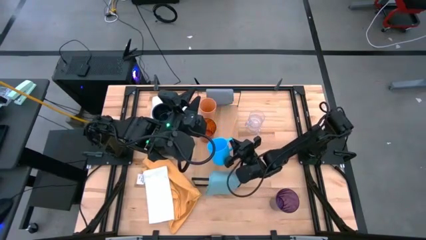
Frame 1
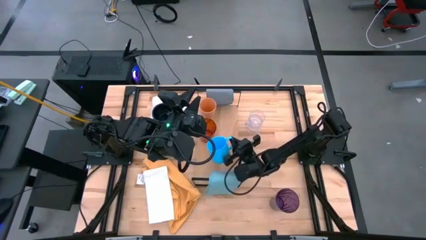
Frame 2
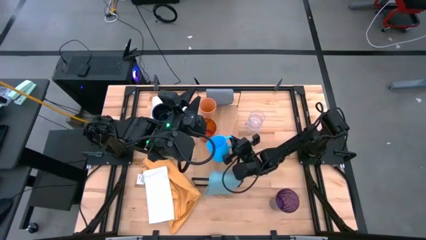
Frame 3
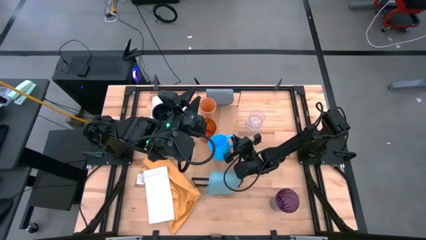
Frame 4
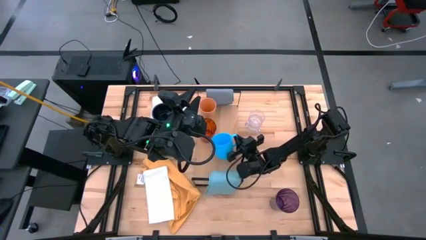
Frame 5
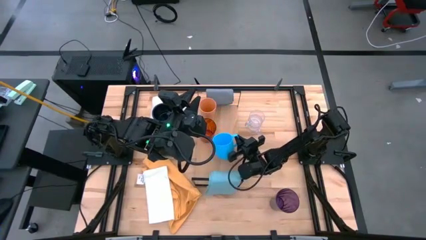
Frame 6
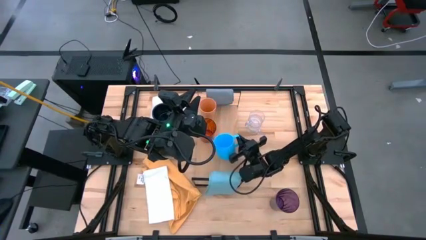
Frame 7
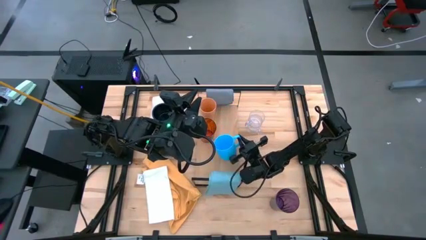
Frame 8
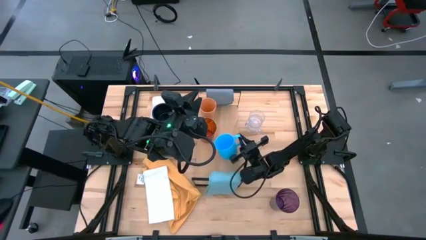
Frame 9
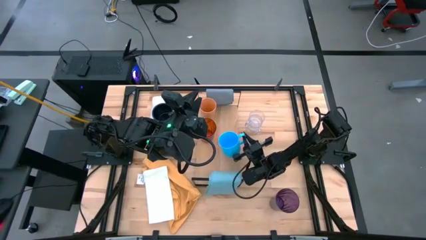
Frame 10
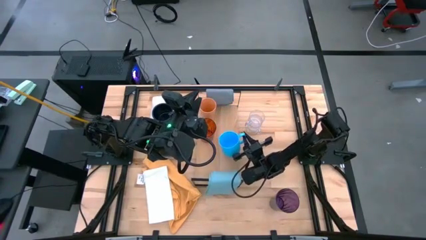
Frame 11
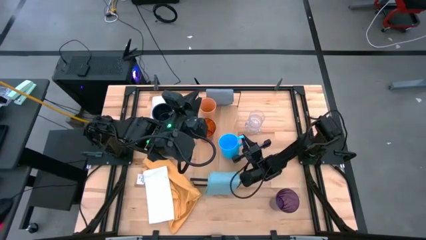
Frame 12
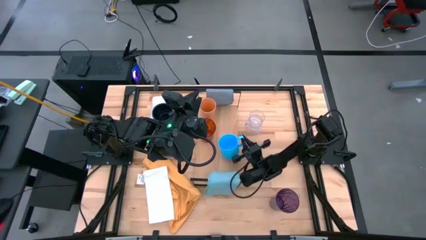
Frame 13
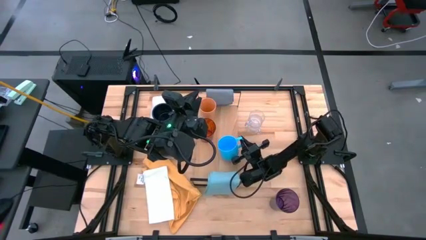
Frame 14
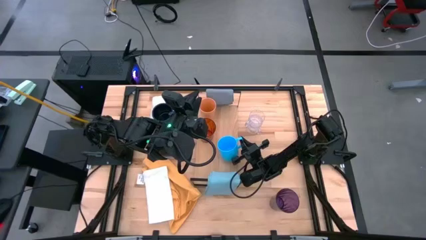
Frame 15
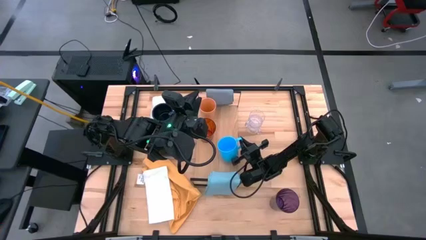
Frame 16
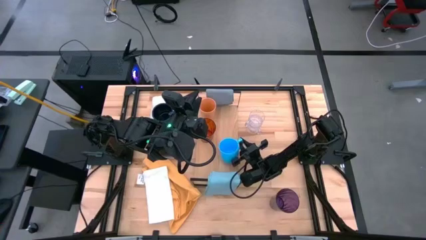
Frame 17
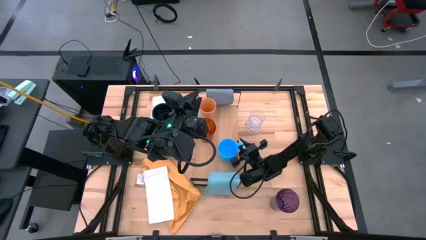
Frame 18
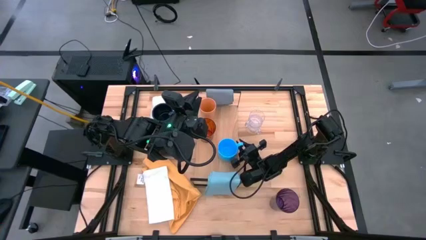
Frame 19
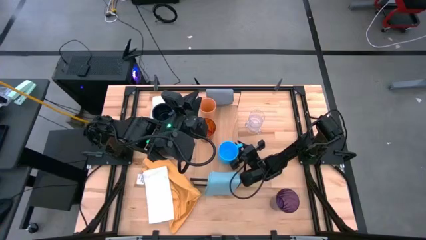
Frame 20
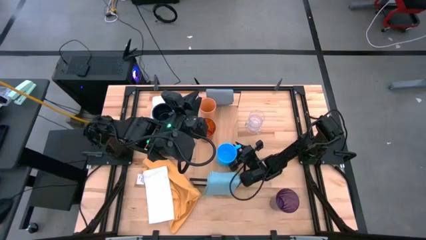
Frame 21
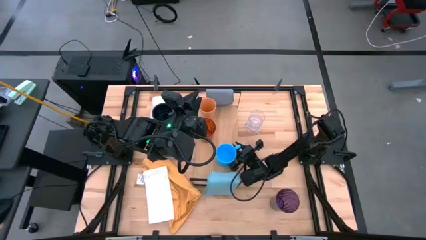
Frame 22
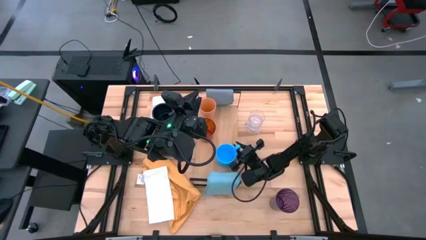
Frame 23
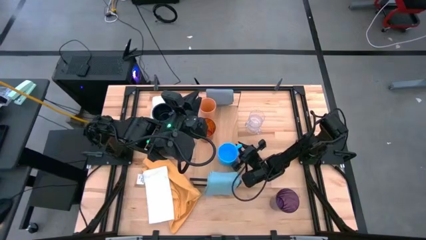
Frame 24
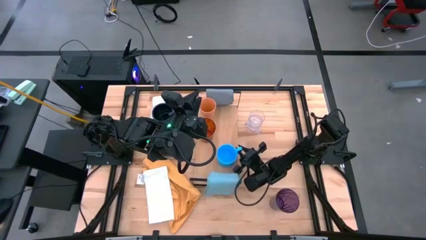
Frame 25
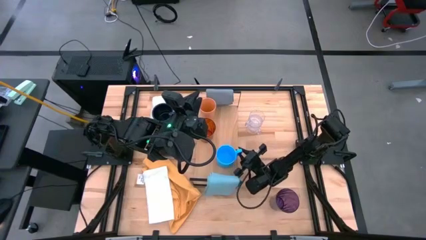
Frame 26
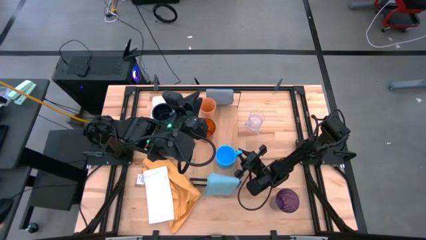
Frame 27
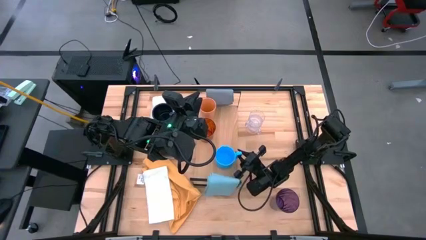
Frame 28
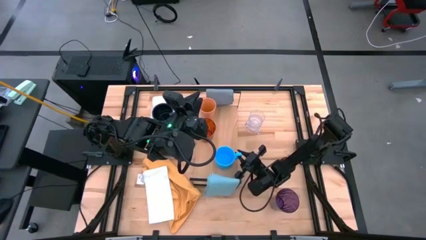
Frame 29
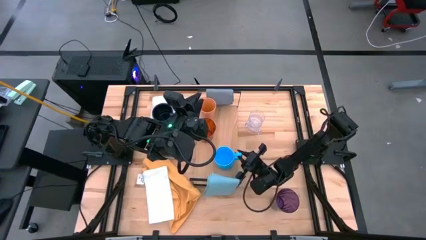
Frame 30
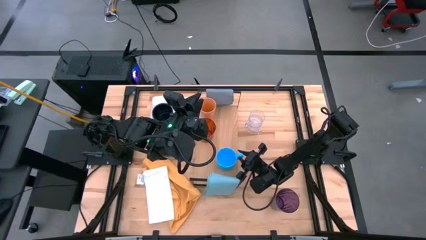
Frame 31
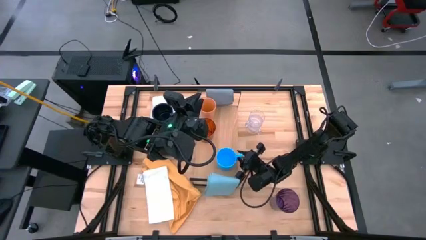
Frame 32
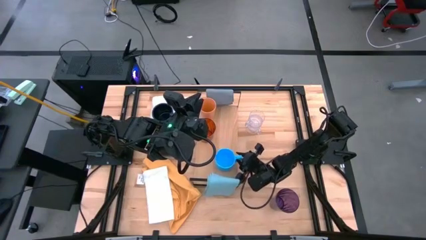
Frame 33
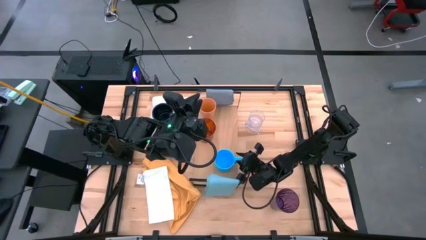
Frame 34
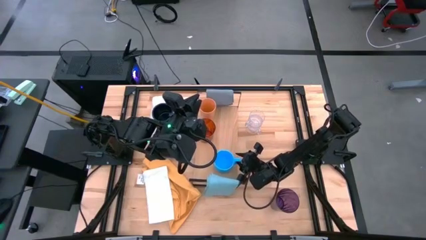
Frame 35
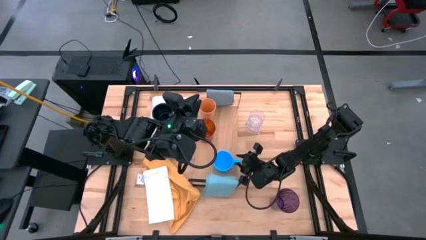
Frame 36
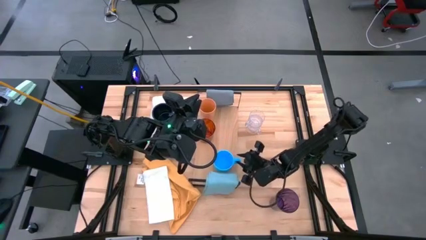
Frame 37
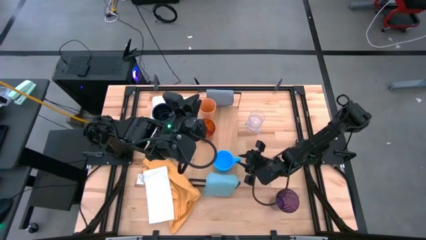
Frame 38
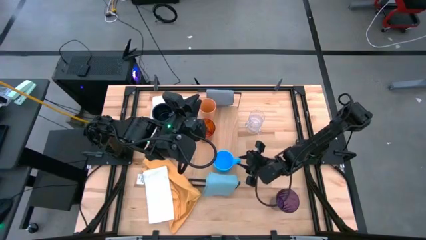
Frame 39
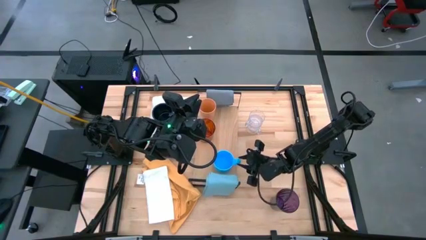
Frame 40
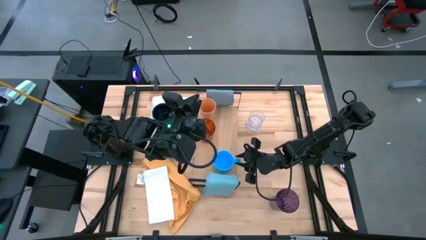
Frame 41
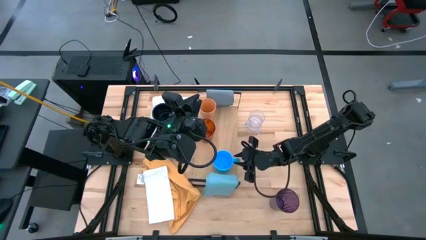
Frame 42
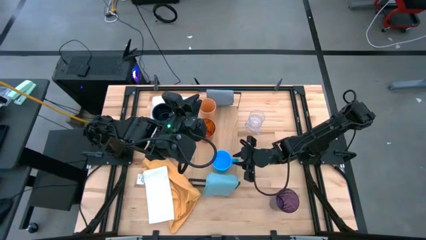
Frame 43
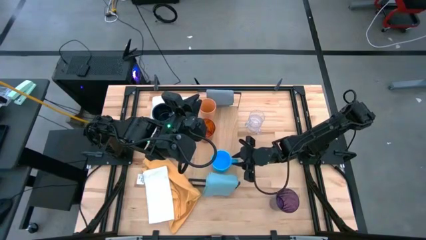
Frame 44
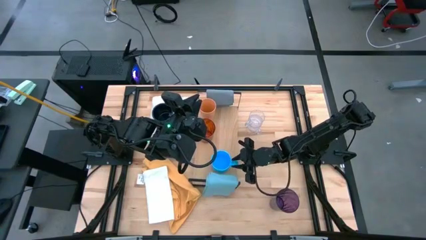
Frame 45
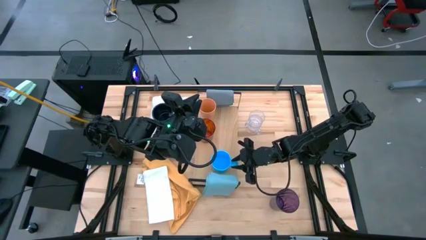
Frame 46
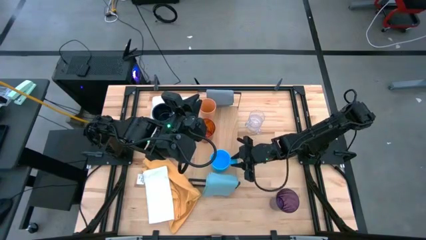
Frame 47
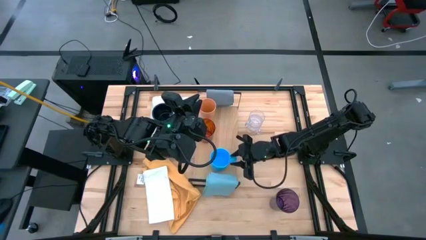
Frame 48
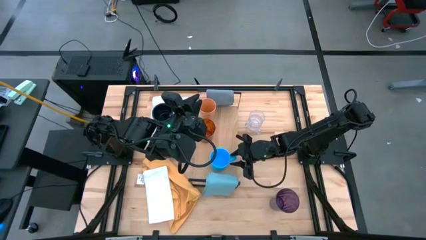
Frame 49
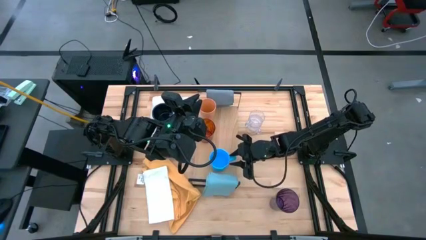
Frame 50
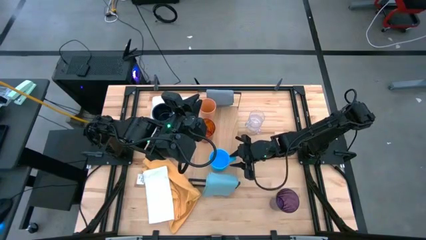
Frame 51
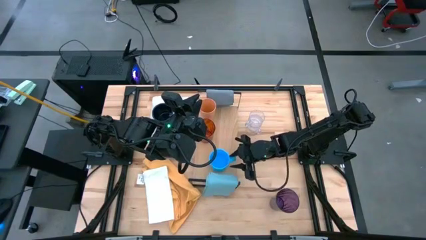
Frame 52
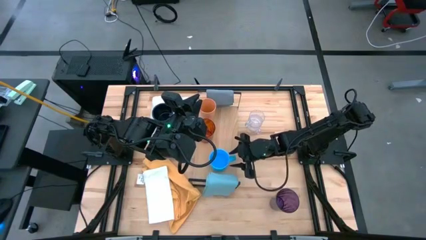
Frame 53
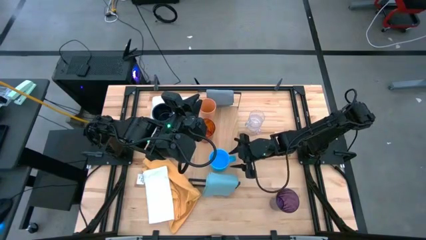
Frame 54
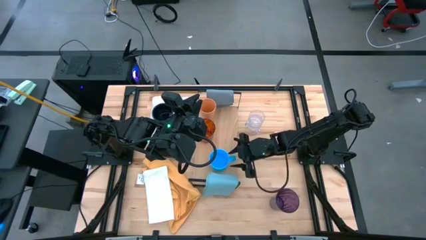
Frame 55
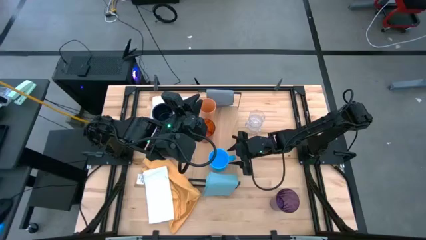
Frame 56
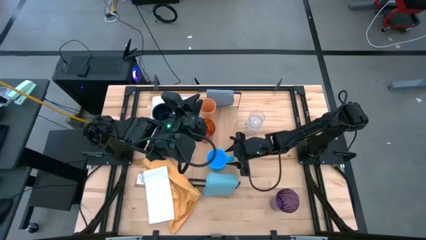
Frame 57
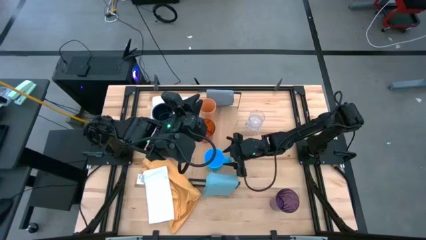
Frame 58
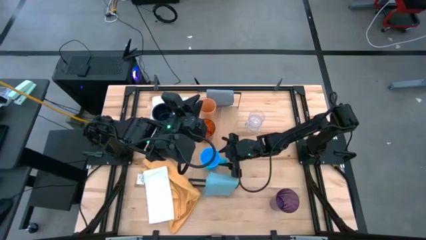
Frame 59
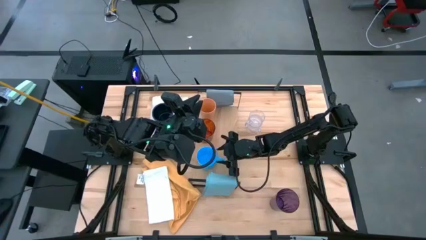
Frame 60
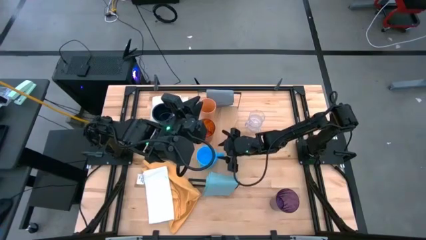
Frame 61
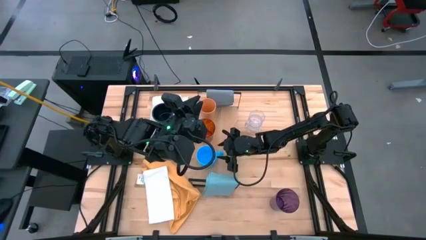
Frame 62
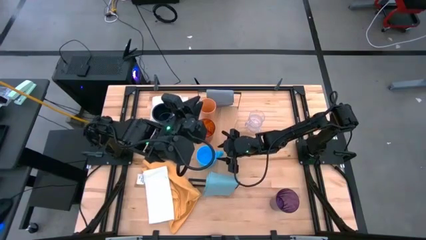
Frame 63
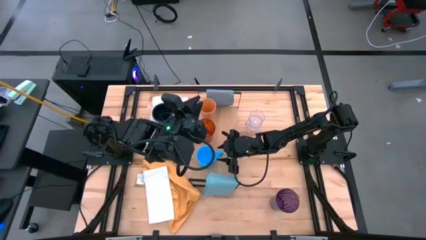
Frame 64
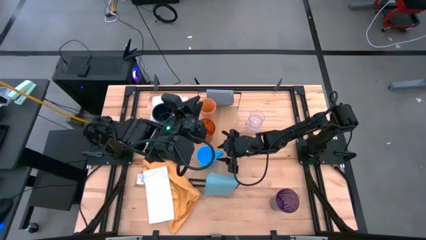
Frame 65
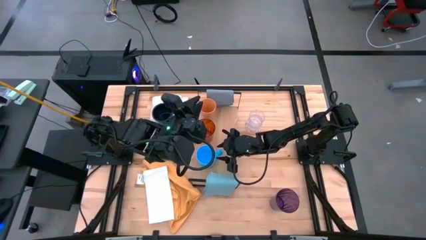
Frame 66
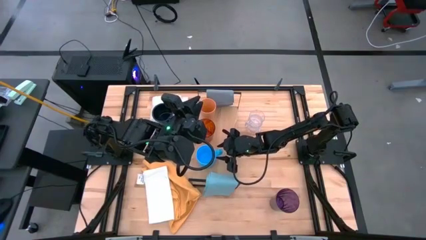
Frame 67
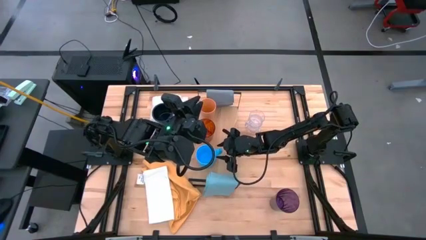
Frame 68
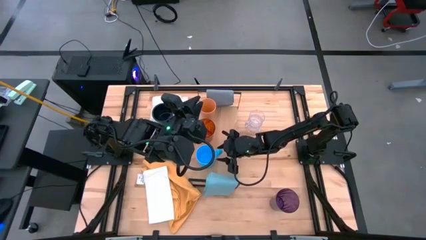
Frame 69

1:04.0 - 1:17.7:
Task: Stack small to large cups/mugs on shelf
Put the light blue mug on the shelf

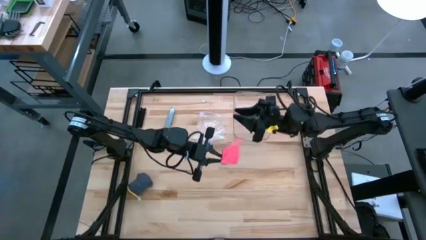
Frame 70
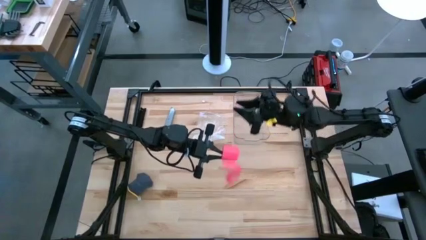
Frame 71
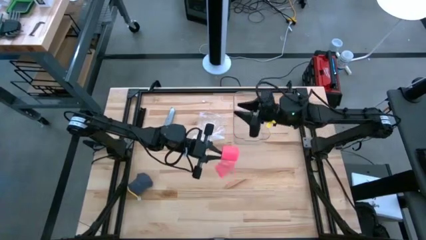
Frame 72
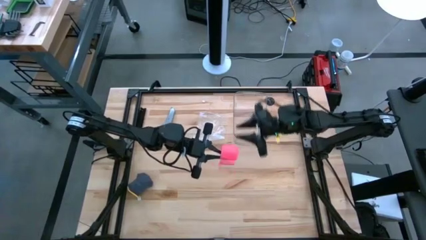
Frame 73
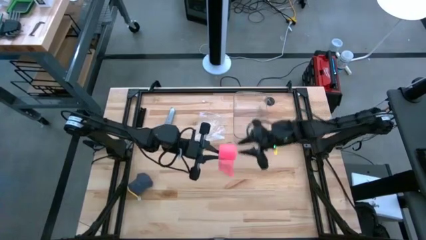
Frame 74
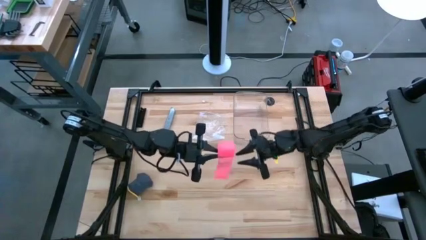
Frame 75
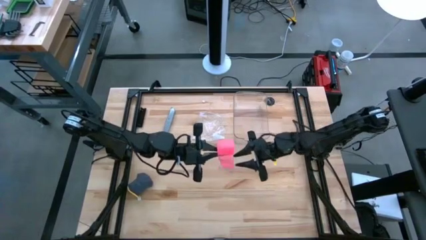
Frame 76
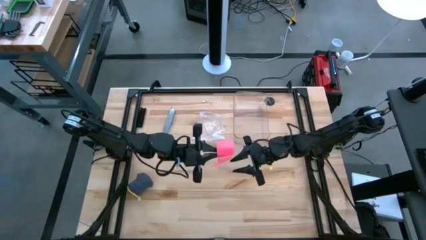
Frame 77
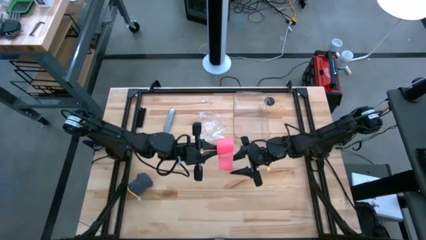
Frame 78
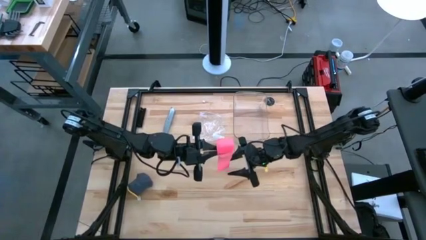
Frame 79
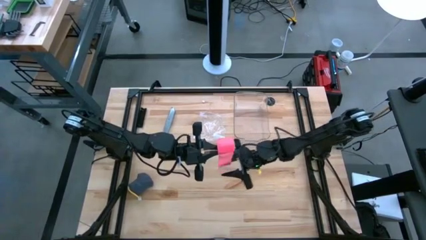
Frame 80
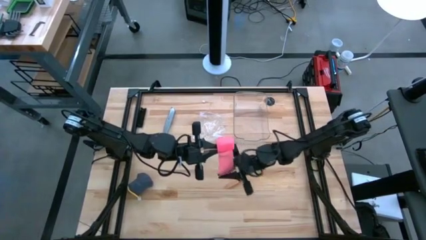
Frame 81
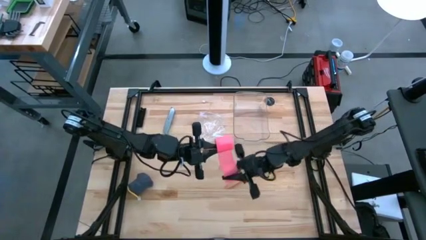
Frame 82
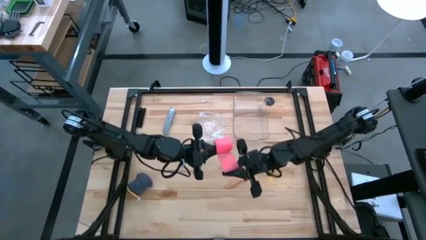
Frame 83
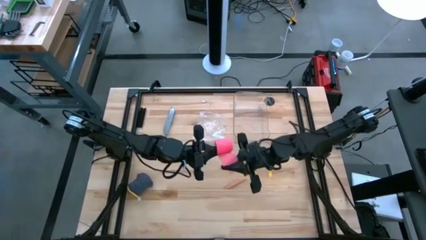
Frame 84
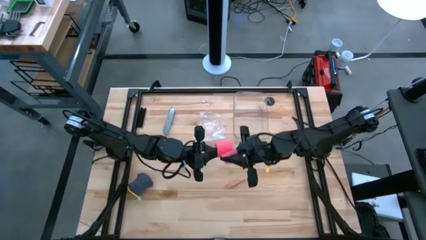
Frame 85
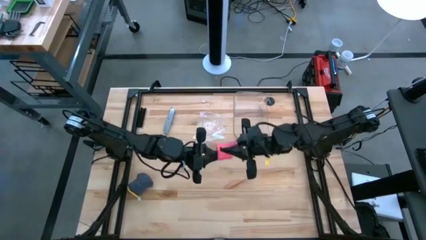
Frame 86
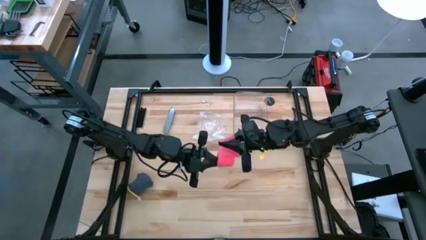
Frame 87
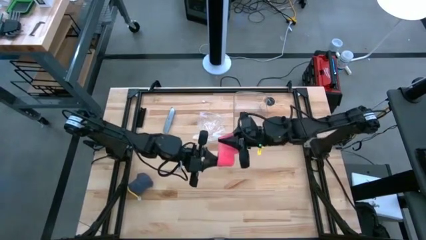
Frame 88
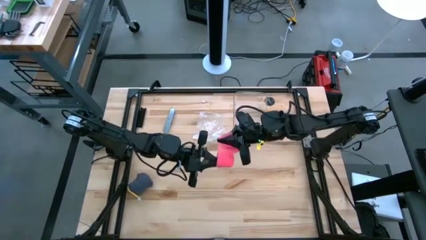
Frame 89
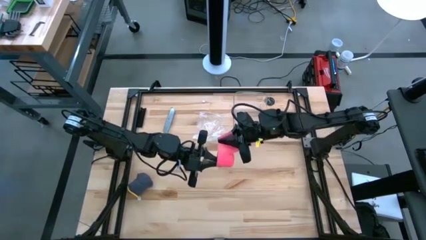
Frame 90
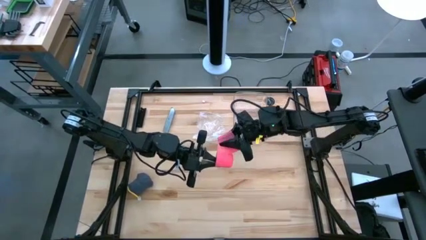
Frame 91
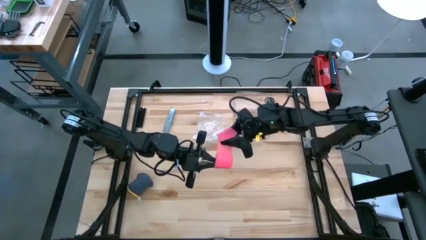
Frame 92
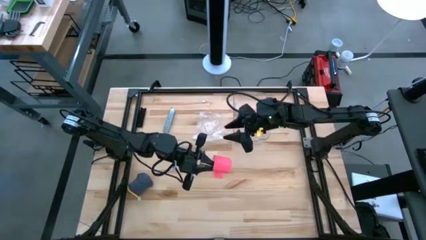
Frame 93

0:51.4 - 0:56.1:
Task: Roll bandage
Roll the pink bandage
